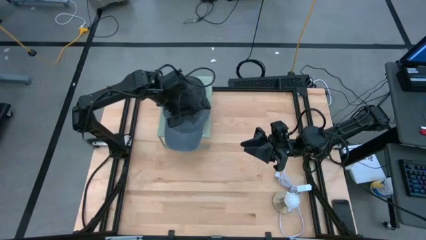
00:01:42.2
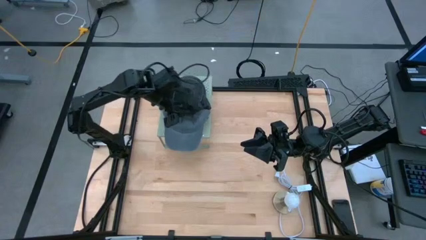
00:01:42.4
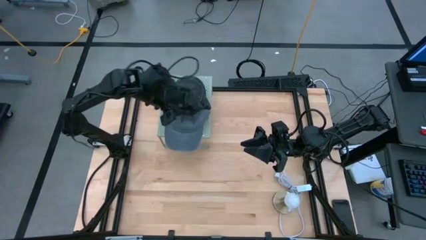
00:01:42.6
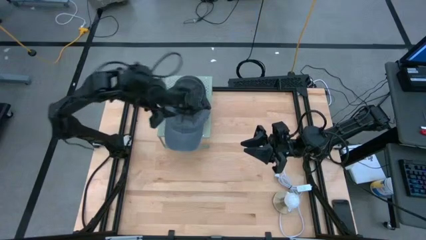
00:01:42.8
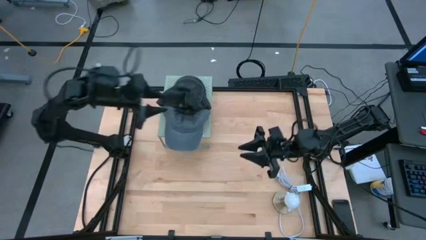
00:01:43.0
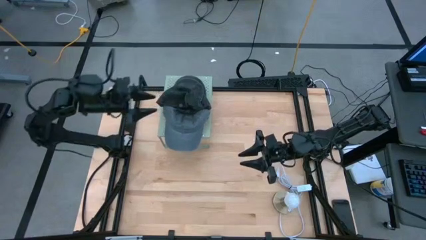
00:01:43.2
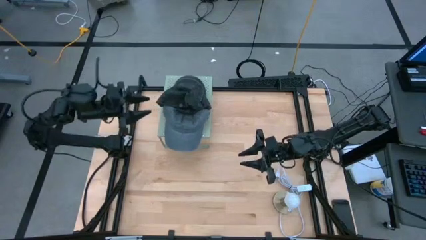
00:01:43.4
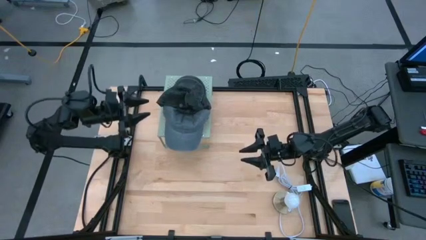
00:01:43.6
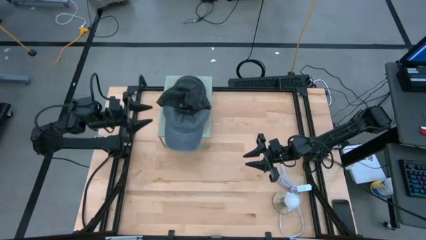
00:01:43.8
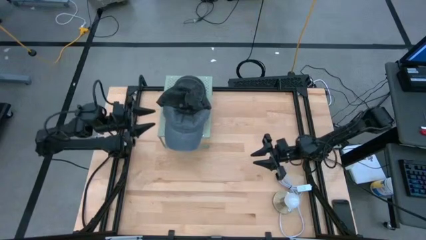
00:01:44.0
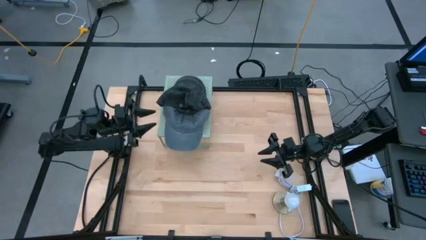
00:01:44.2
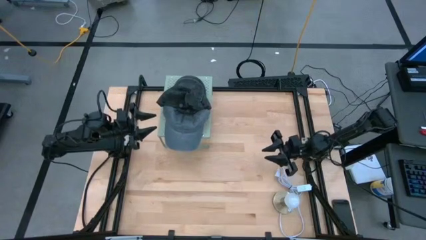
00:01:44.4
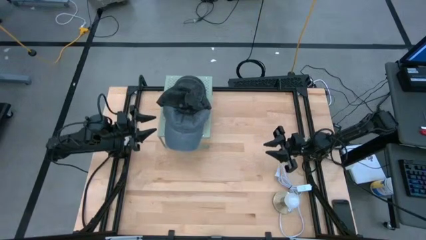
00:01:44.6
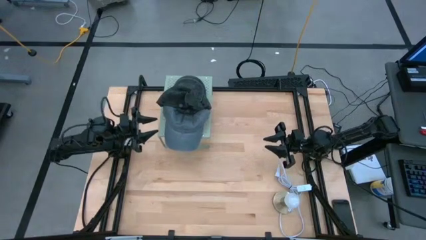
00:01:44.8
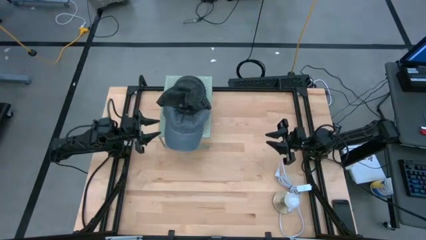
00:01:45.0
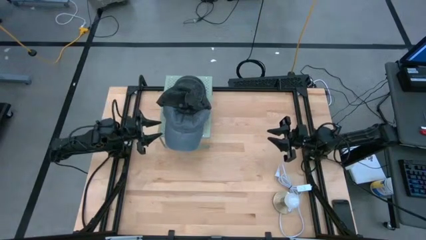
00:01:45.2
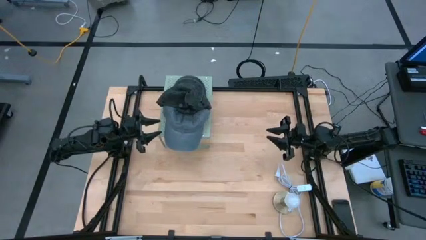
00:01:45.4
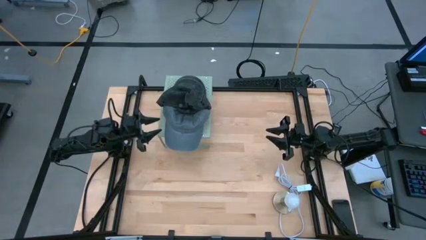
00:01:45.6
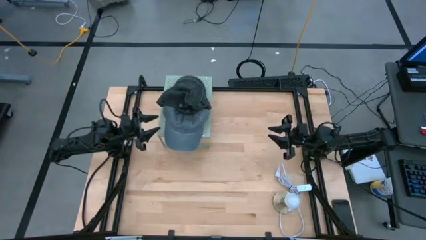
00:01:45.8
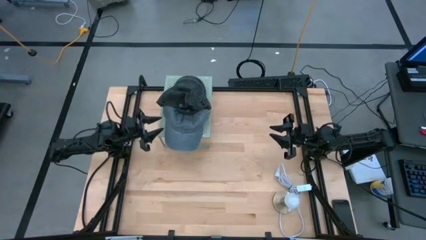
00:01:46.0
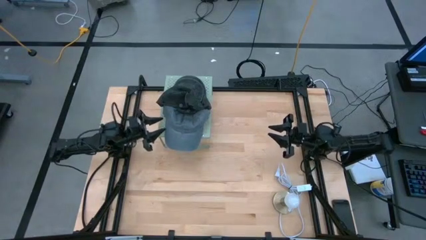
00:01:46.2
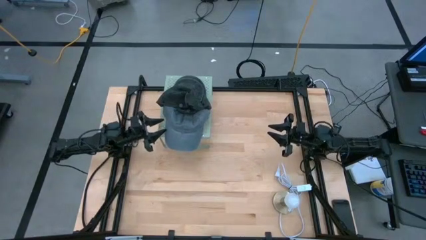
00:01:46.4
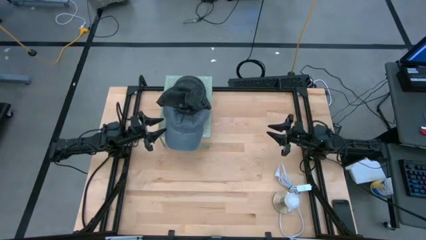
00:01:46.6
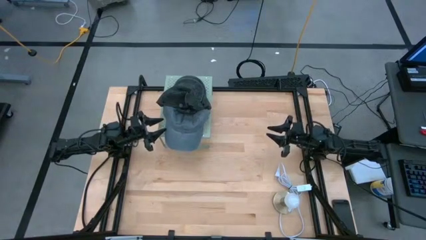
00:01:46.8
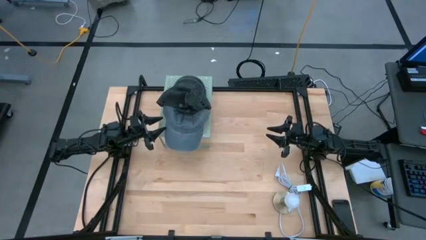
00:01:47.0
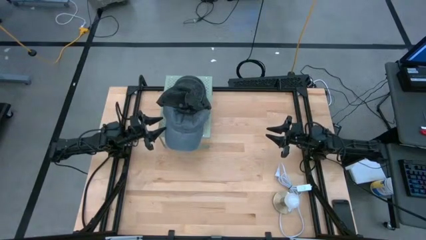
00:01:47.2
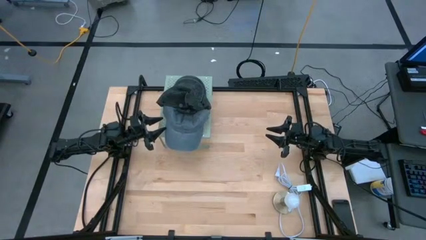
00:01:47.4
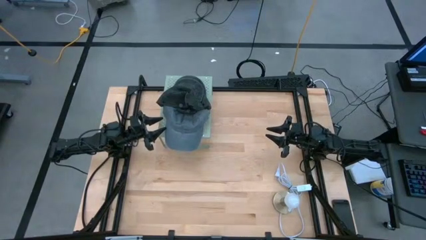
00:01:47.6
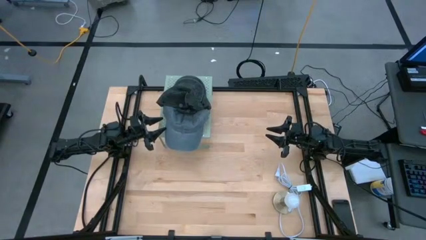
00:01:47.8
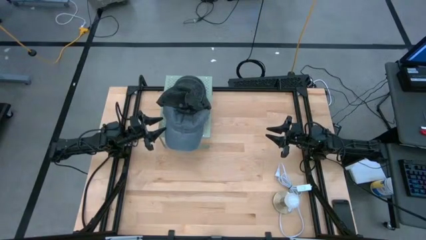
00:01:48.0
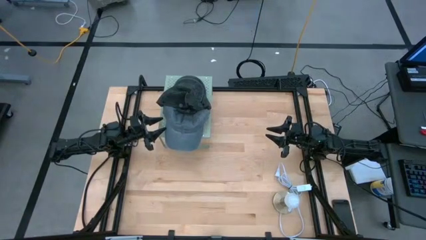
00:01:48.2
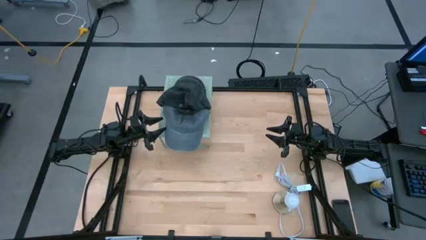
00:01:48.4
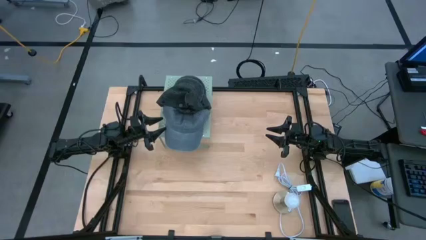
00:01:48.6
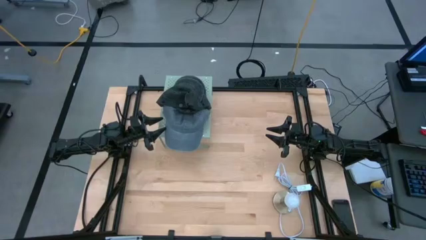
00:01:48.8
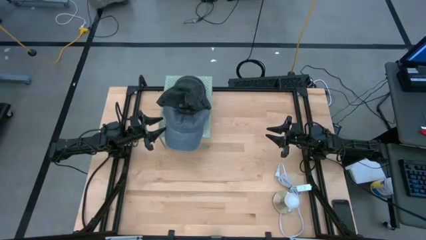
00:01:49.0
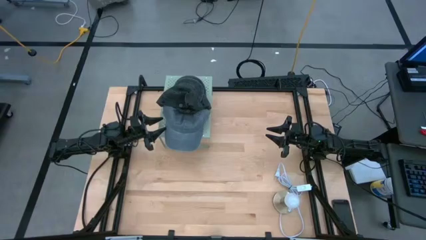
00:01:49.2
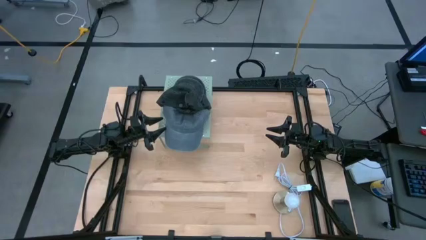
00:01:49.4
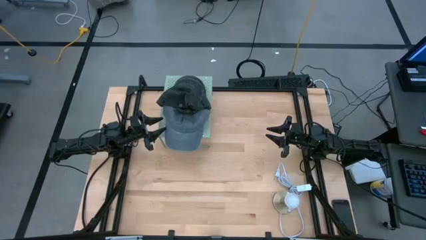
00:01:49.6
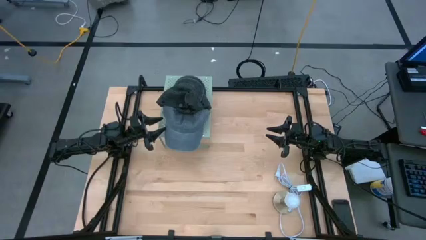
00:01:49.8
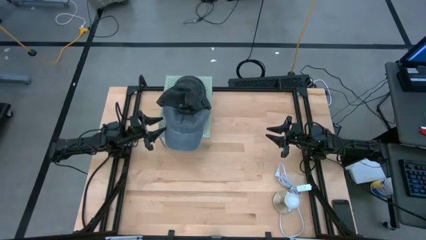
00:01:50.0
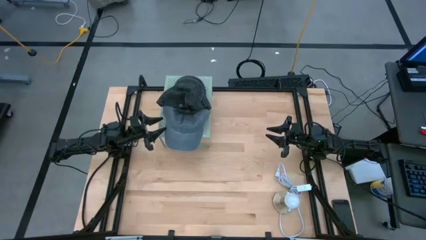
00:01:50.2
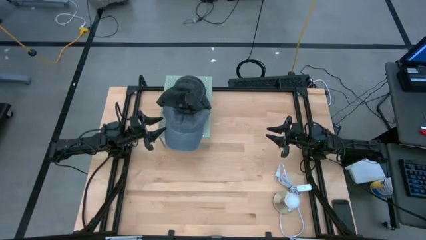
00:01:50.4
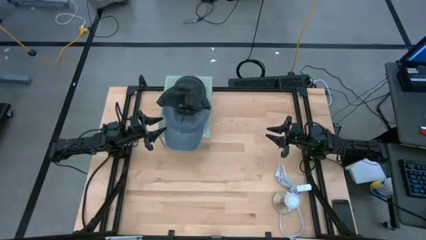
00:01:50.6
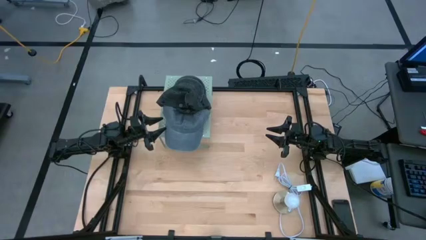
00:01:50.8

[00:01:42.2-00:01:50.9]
Task: Pick & Place hat
Return to Home Position

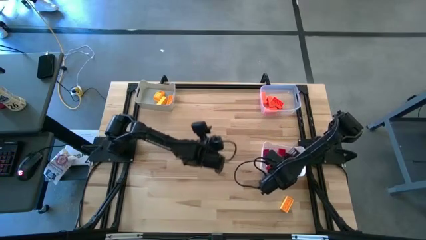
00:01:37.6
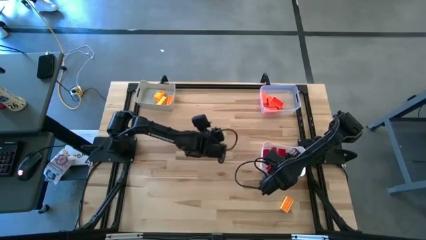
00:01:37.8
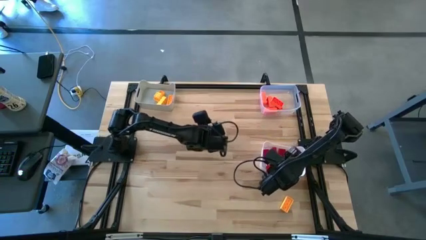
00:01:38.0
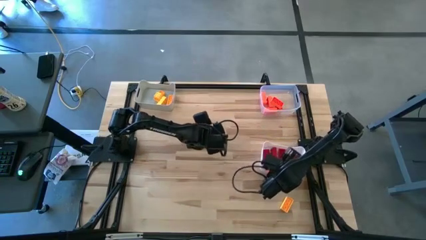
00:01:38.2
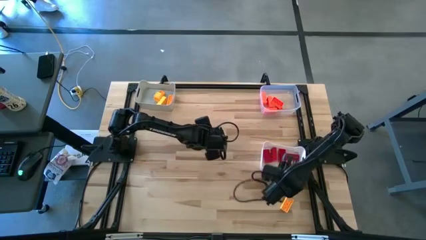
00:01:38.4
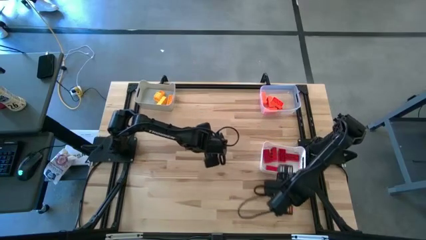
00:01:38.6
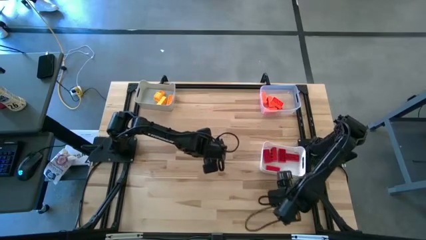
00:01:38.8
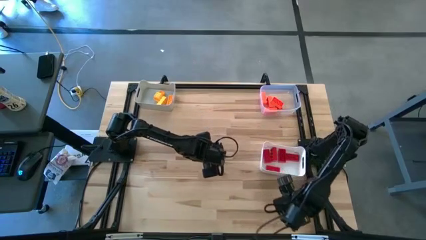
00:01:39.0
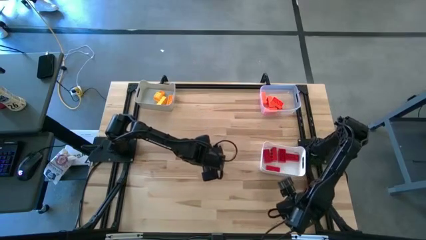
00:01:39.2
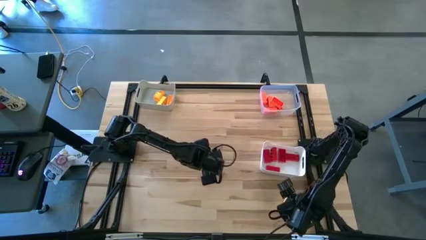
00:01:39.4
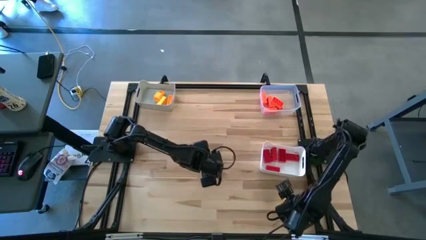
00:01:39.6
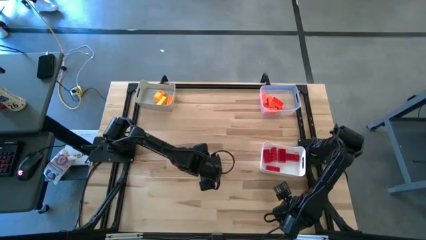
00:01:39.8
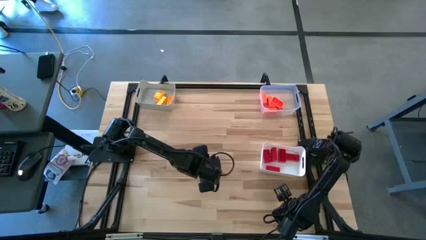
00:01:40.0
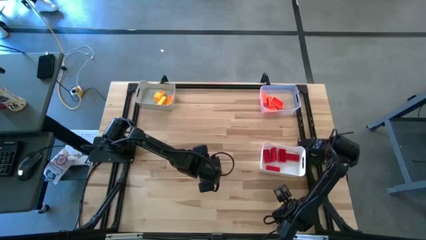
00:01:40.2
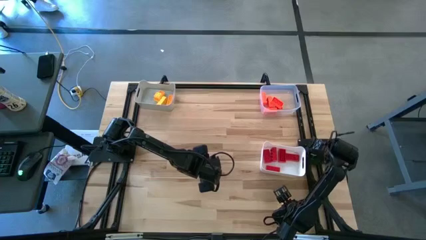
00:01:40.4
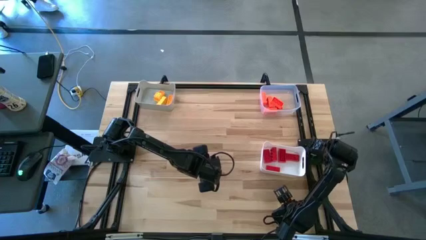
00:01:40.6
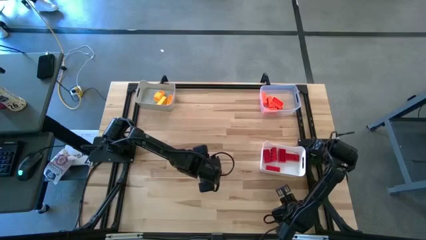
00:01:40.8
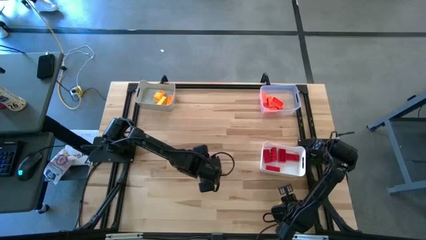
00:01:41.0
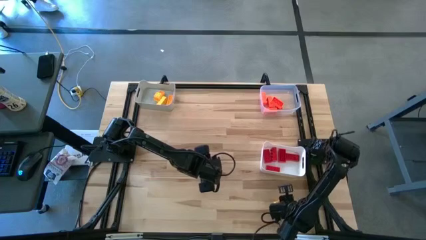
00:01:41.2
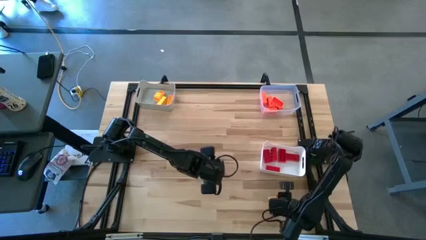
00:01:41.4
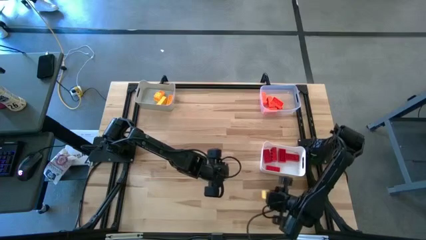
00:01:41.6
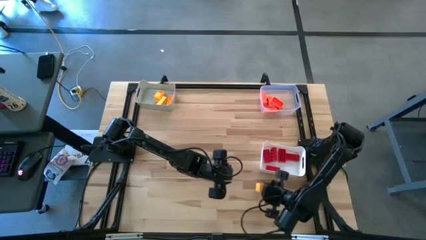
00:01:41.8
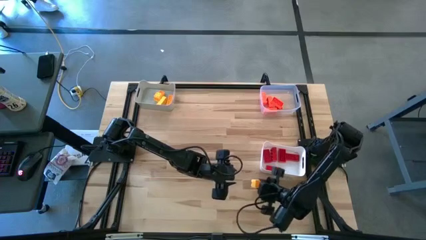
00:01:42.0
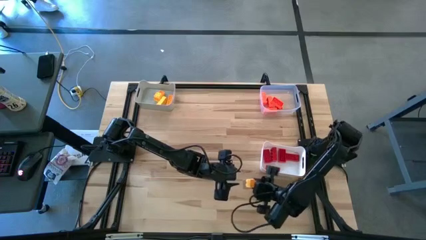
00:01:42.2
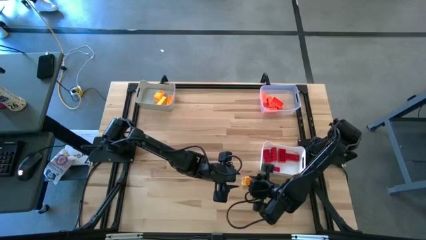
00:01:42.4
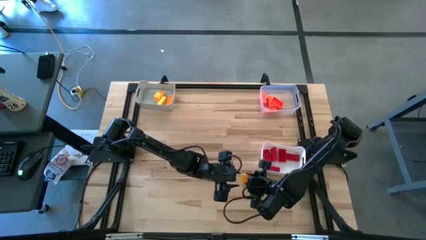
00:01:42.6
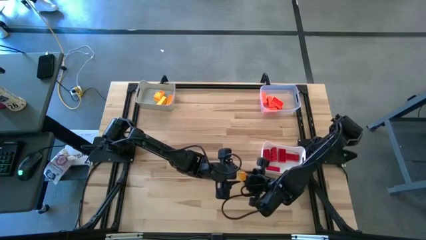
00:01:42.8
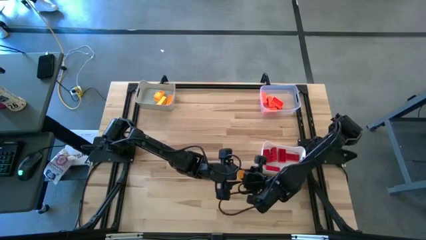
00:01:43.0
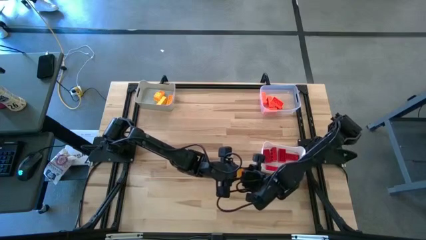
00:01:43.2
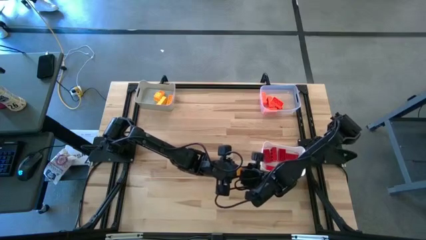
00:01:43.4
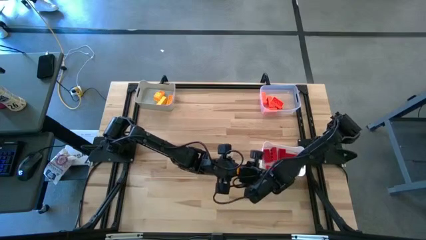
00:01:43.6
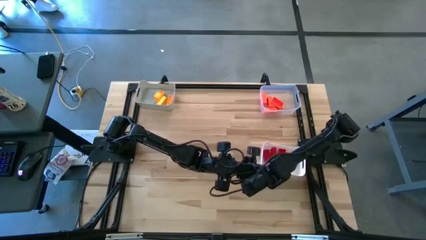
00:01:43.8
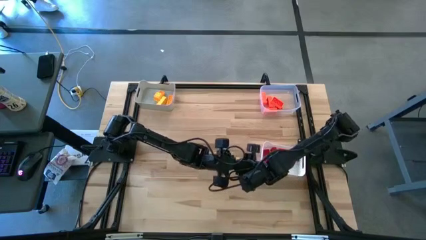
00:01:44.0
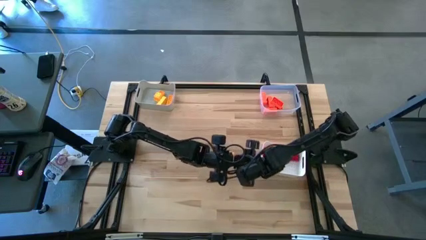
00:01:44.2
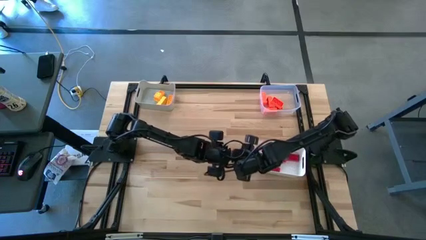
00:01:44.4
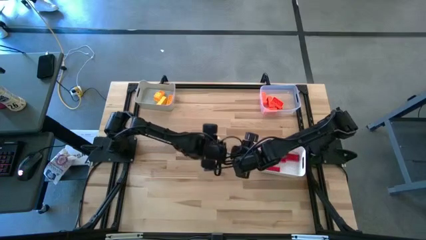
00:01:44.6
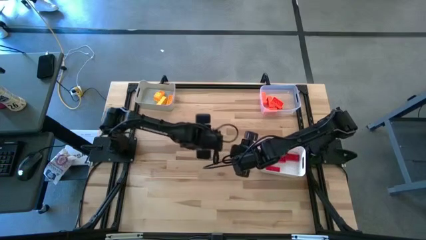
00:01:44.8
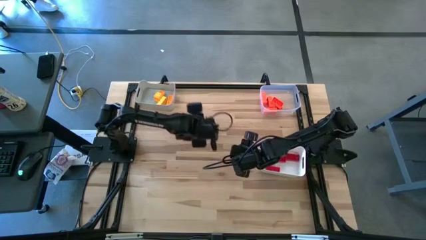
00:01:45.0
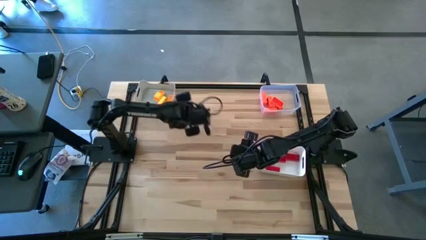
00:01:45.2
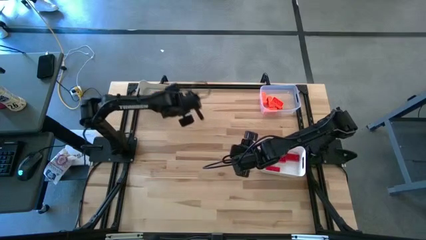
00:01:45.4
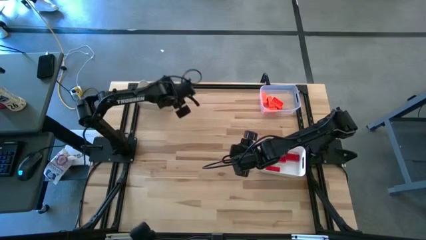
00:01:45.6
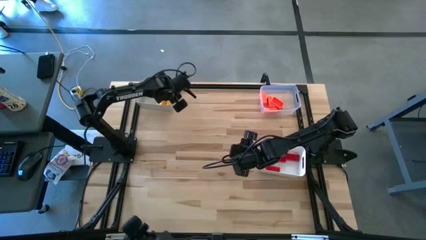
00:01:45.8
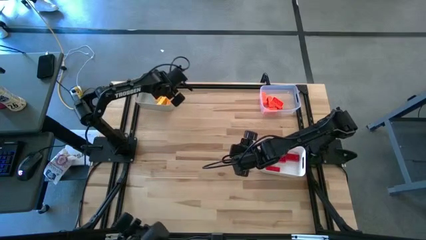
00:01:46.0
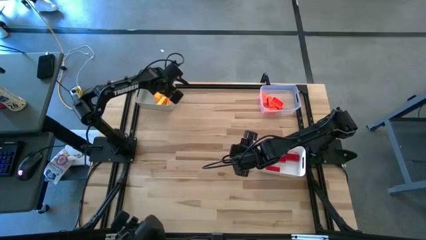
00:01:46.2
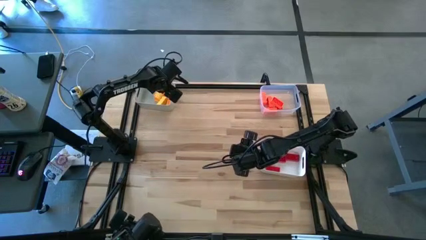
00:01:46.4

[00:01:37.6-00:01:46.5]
Task: Sort & place blocks by color
Put the yellow block into the gray bin
